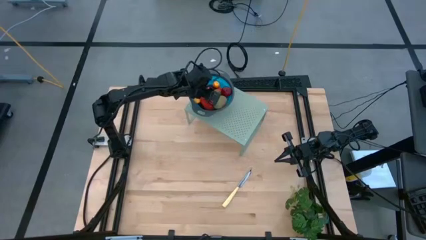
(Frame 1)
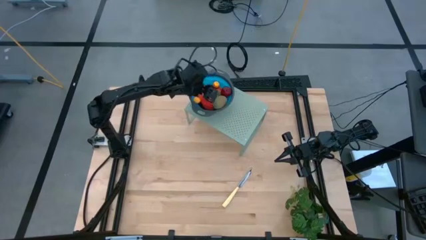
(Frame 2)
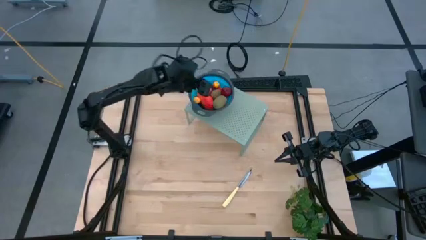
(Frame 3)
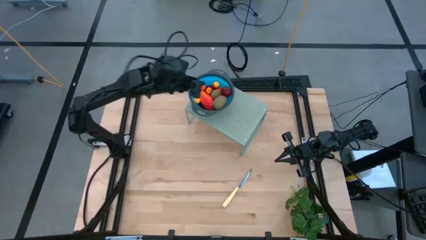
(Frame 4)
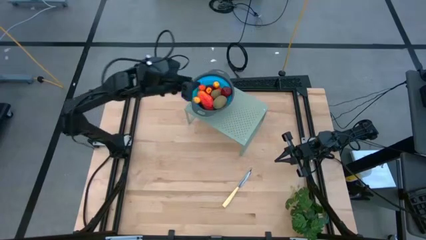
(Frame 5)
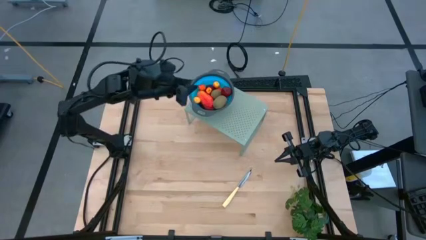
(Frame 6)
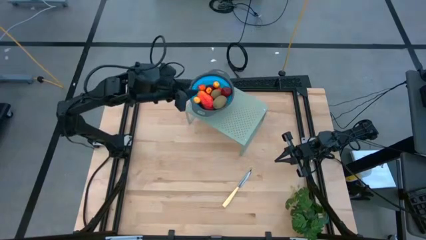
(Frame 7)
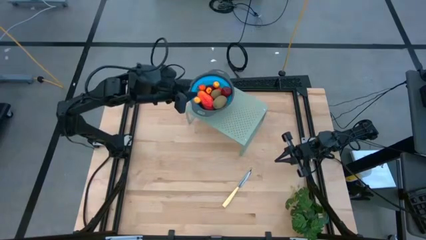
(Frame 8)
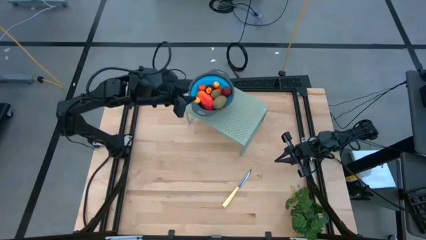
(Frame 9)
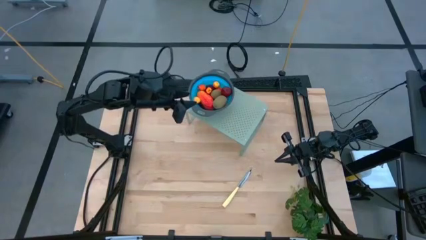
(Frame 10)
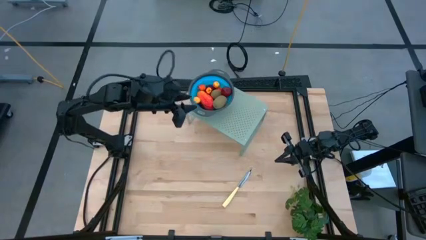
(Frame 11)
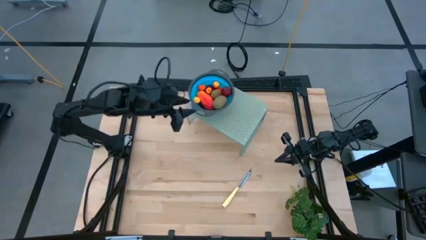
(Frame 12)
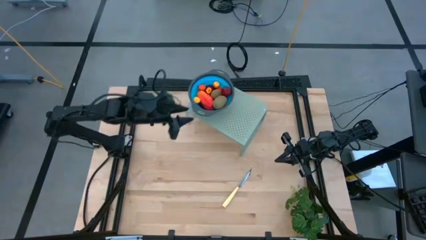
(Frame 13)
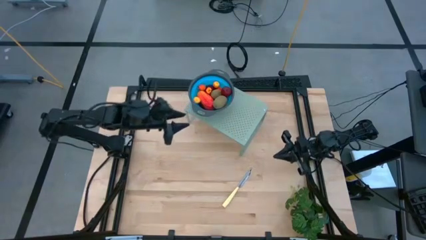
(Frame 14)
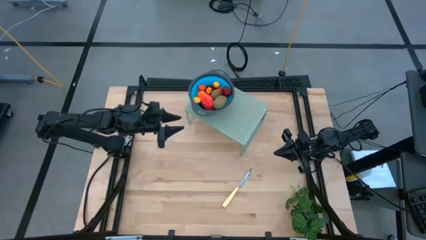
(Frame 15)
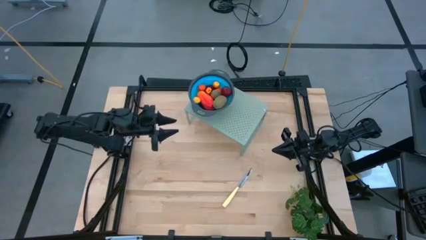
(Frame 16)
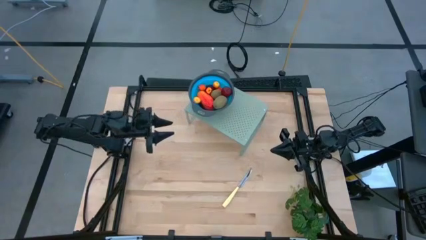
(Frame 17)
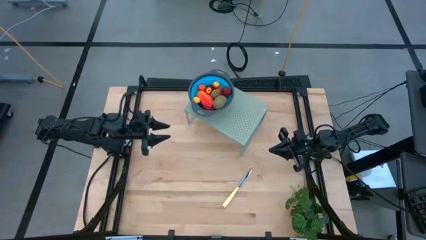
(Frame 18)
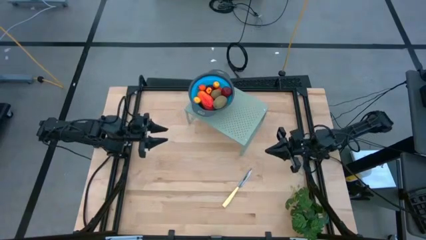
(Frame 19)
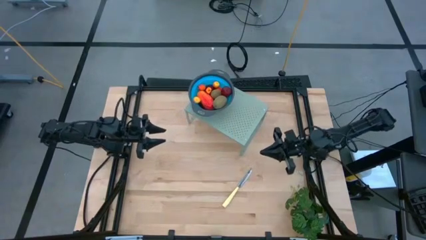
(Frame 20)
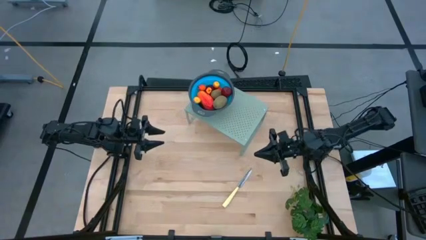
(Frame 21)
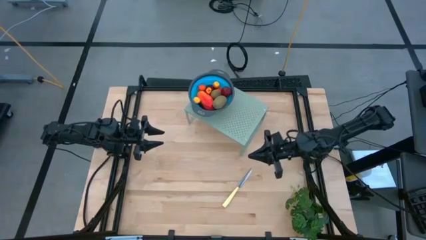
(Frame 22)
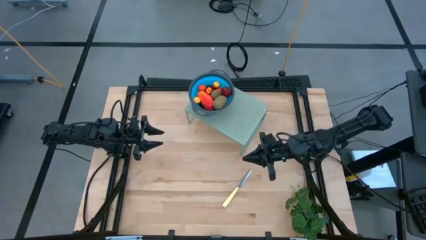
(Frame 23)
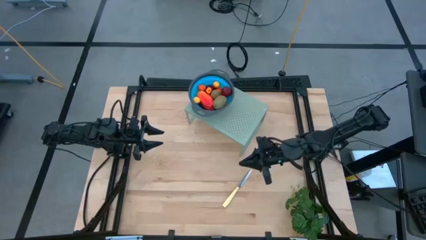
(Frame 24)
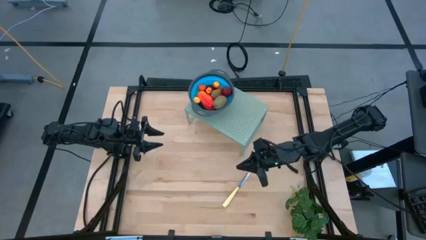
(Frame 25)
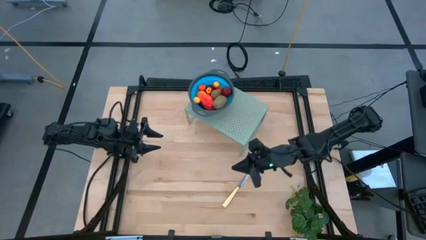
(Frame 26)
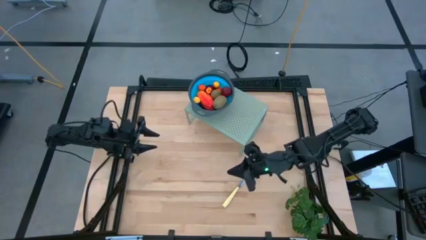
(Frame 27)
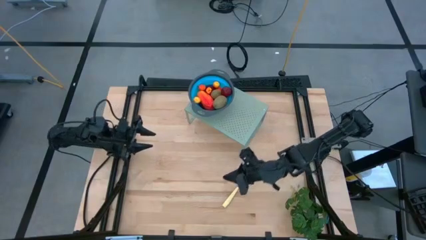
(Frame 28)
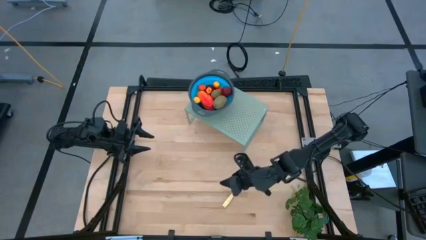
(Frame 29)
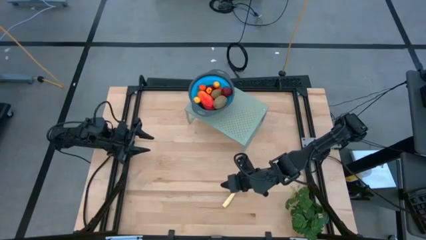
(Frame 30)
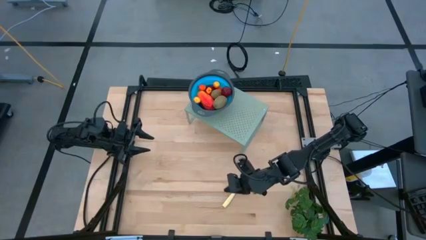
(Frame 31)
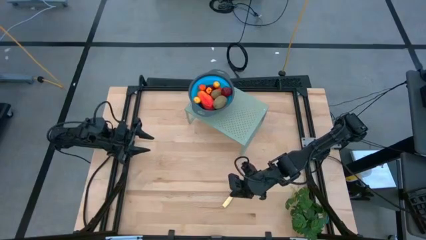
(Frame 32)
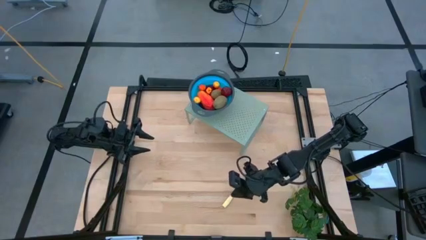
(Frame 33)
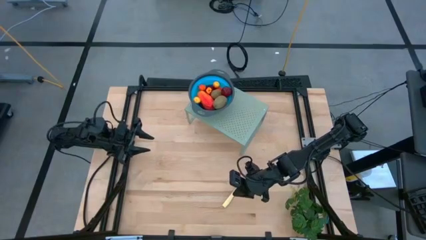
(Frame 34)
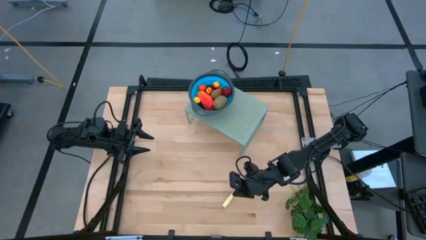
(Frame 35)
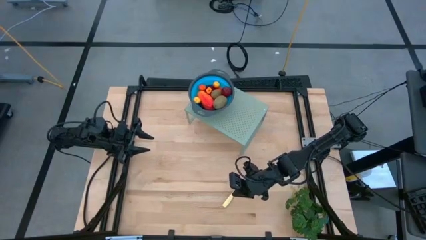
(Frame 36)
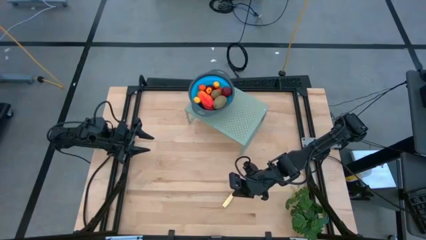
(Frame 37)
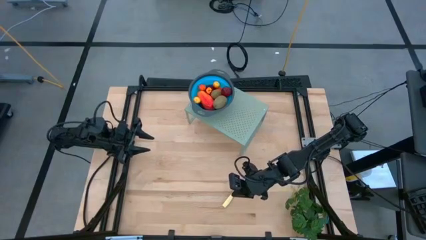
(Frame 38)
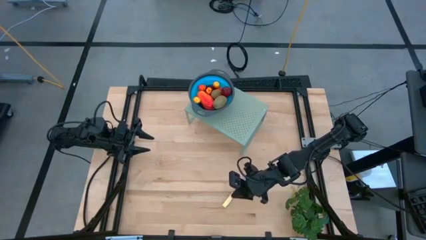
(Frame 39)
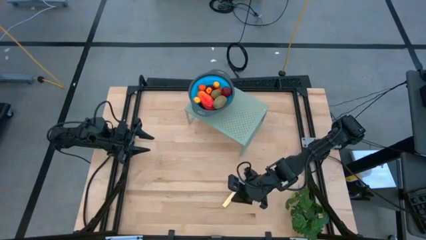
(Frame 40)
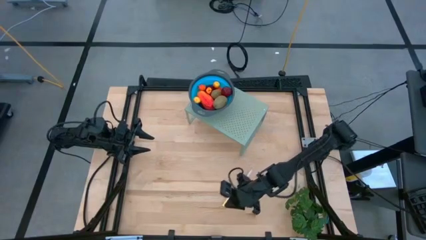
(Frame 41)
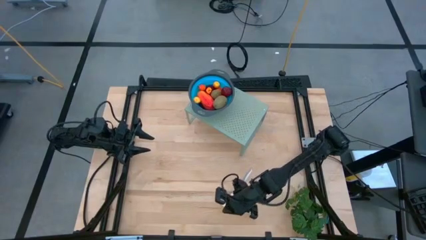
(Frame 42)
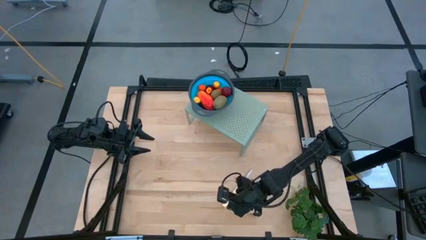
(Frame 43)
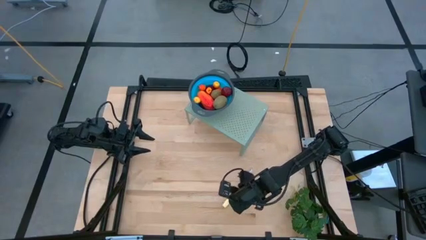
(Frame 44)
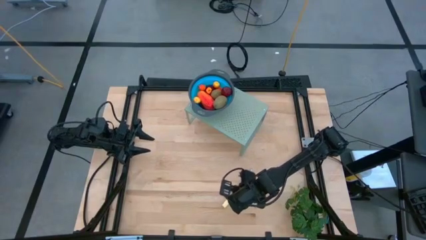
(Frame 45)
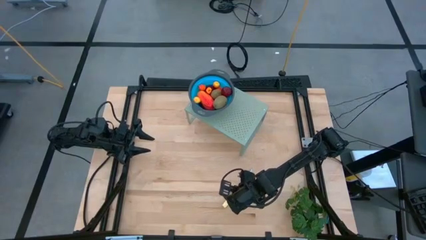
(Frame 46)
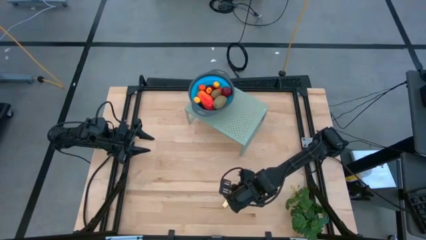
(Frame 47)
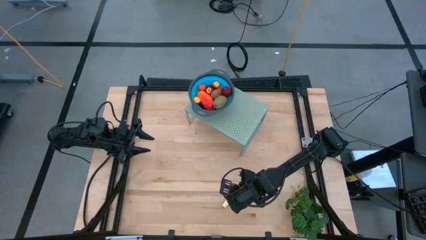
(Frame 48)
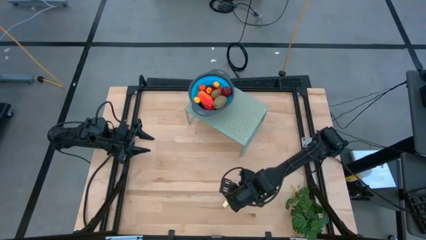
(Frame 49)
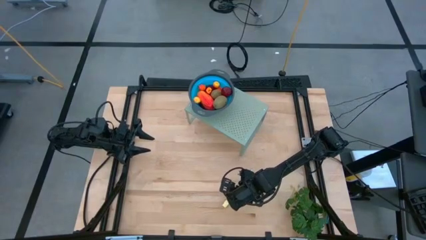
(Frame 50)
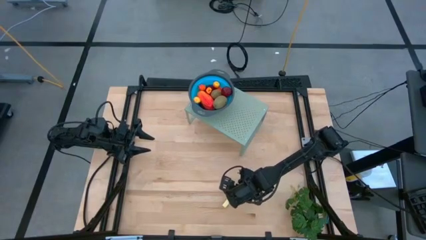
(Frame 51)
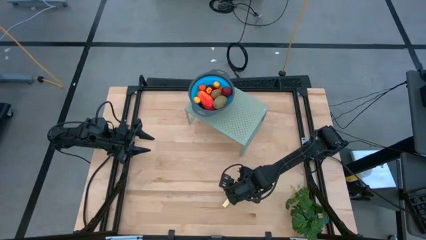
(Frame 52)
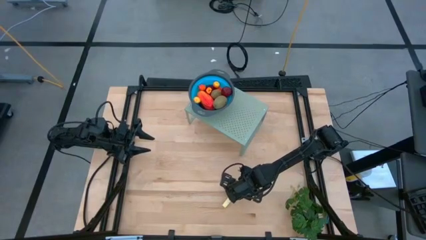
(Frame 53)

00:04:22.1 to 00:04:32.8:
Task: Pick & Place Fruit
Put the yellow table knife on the shelf
